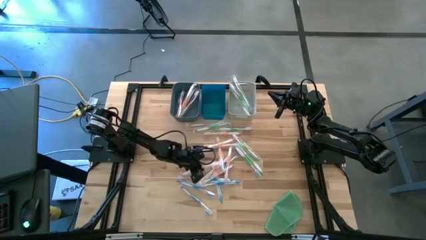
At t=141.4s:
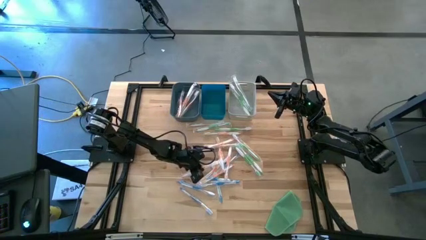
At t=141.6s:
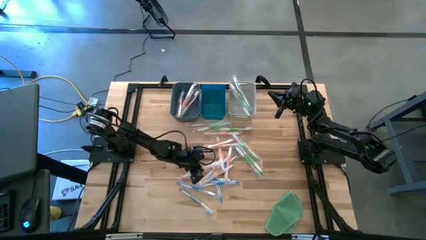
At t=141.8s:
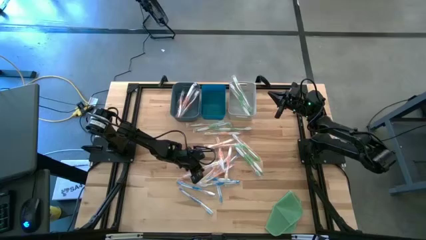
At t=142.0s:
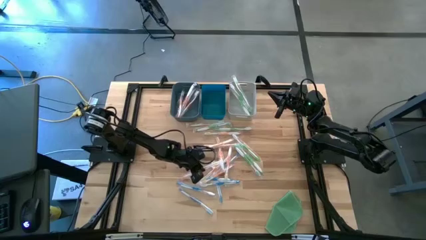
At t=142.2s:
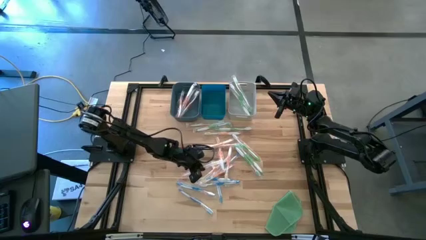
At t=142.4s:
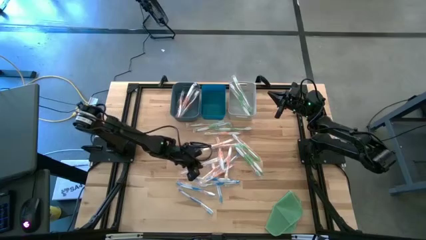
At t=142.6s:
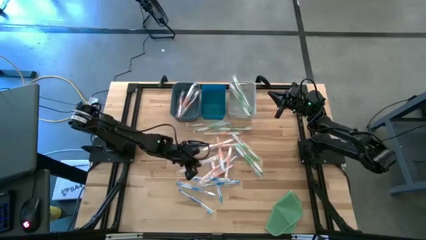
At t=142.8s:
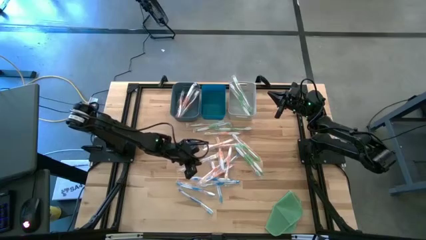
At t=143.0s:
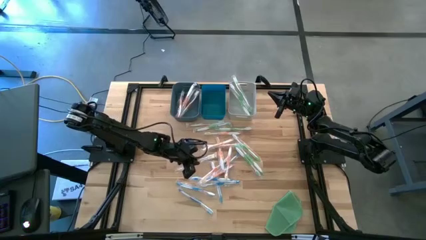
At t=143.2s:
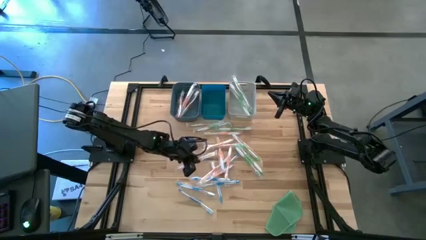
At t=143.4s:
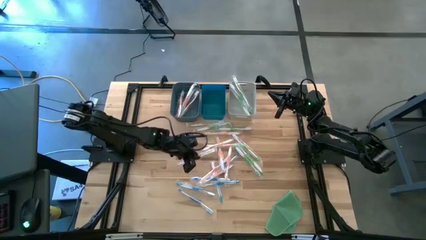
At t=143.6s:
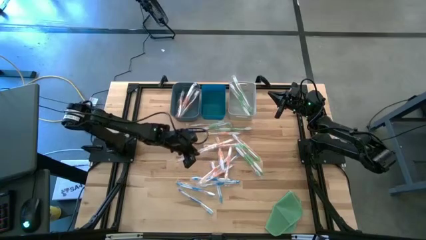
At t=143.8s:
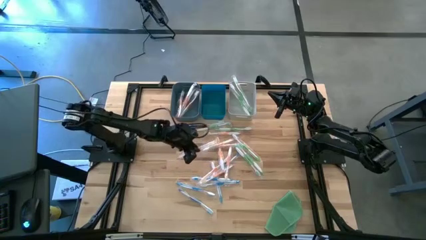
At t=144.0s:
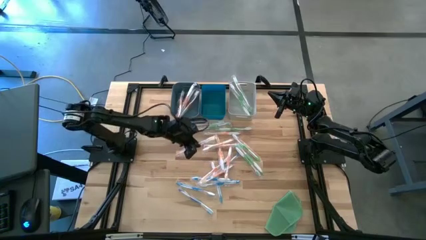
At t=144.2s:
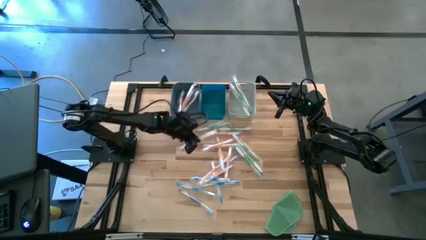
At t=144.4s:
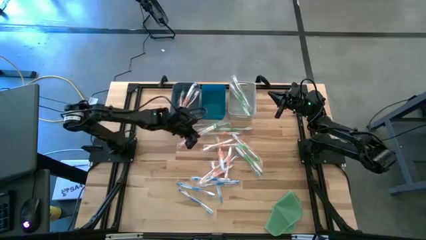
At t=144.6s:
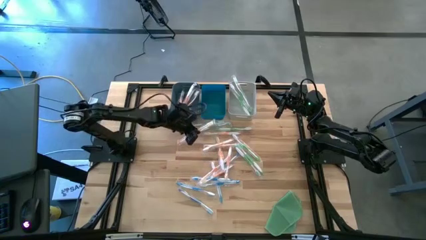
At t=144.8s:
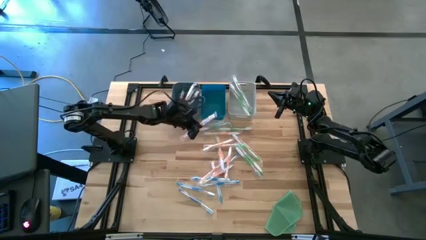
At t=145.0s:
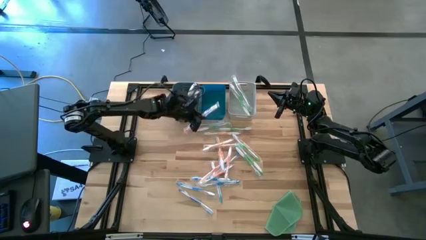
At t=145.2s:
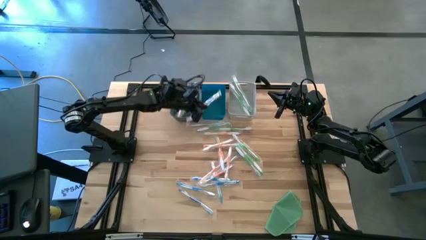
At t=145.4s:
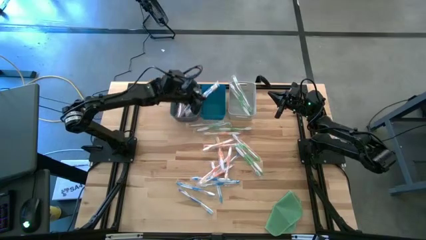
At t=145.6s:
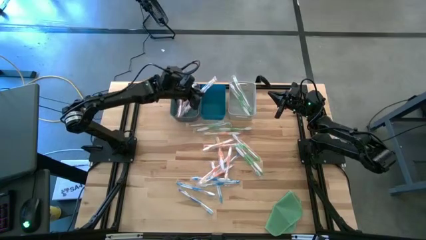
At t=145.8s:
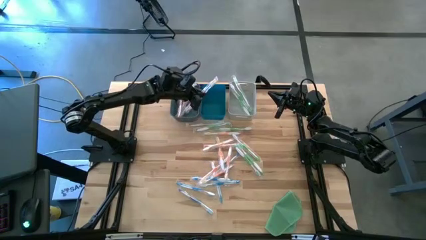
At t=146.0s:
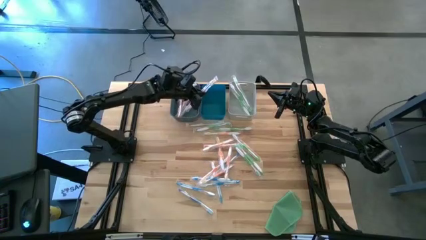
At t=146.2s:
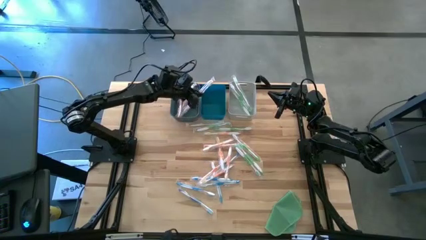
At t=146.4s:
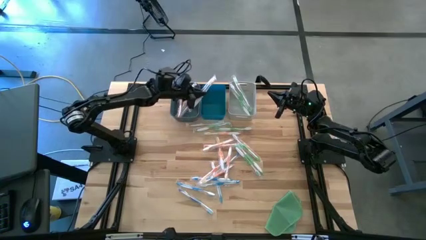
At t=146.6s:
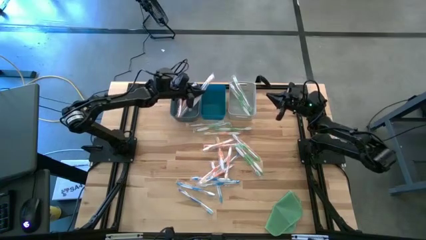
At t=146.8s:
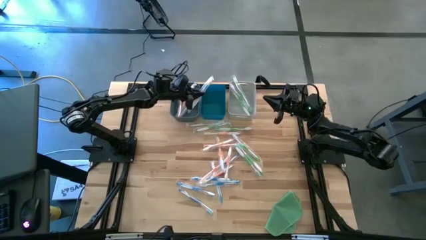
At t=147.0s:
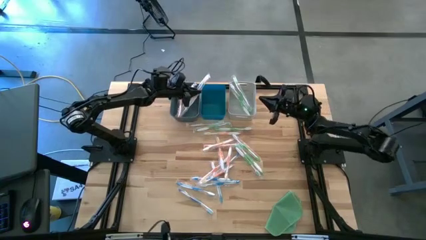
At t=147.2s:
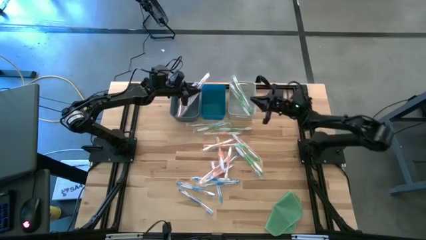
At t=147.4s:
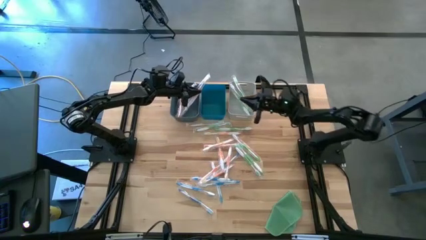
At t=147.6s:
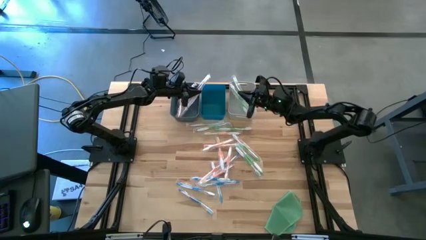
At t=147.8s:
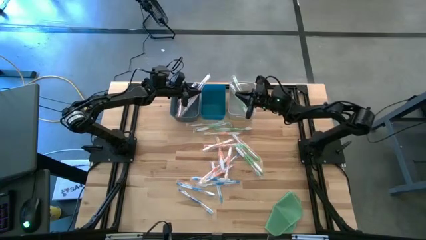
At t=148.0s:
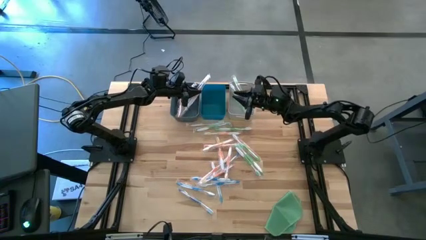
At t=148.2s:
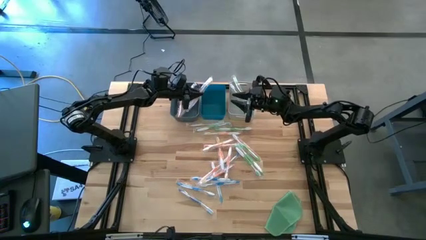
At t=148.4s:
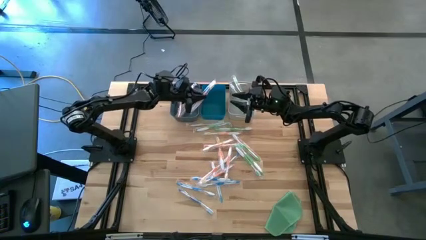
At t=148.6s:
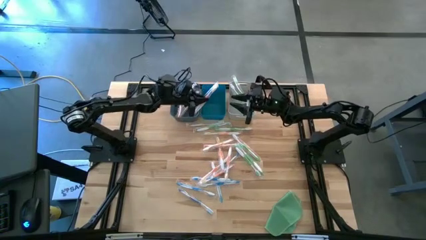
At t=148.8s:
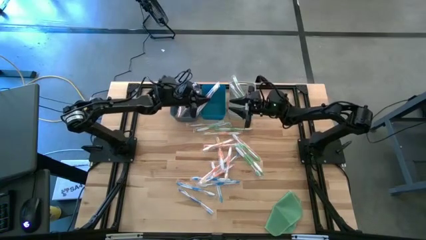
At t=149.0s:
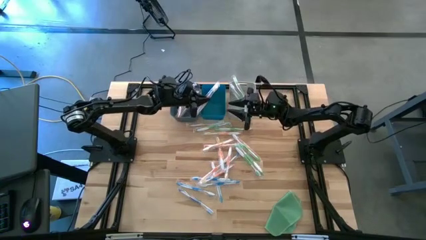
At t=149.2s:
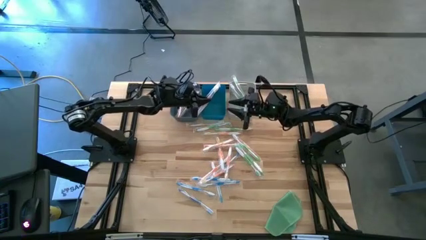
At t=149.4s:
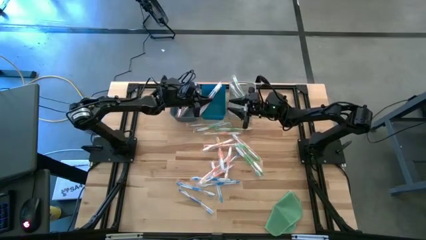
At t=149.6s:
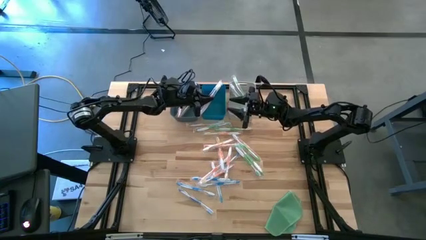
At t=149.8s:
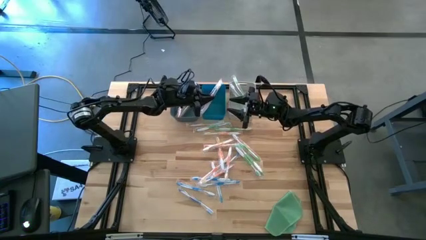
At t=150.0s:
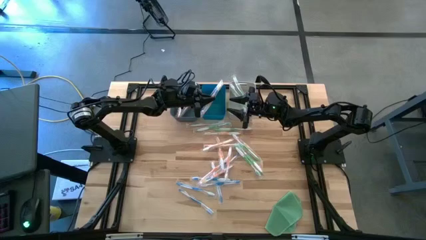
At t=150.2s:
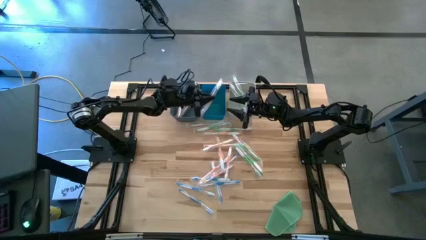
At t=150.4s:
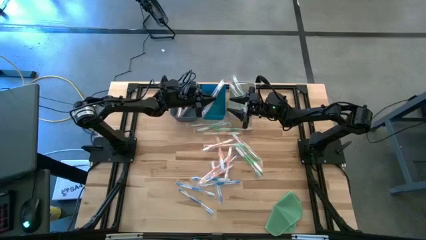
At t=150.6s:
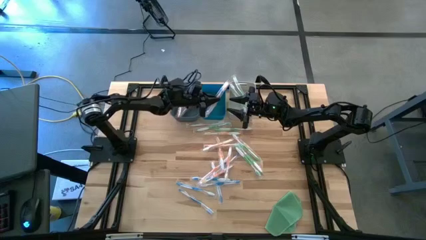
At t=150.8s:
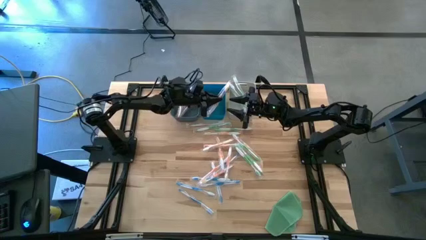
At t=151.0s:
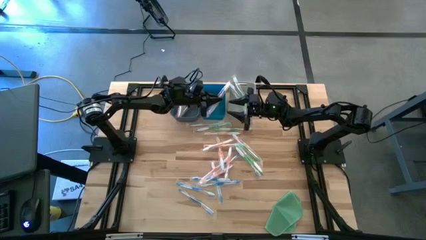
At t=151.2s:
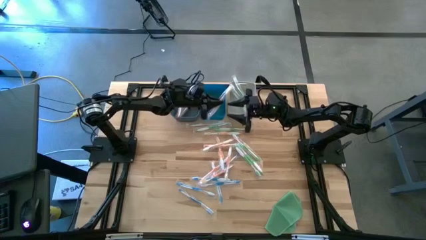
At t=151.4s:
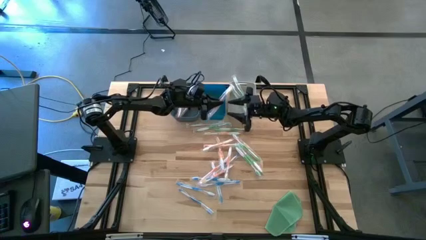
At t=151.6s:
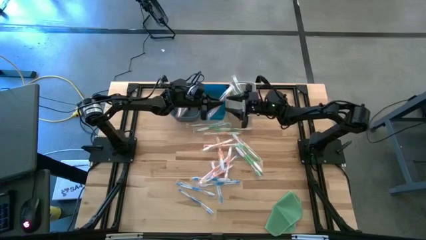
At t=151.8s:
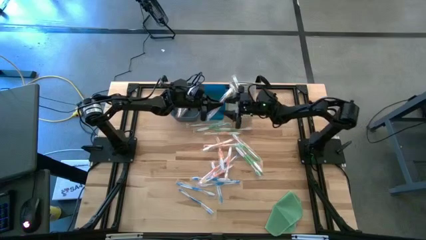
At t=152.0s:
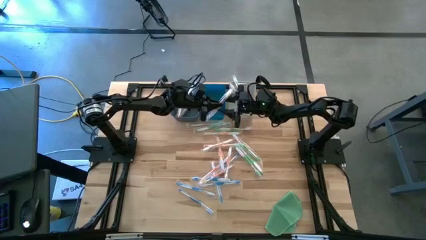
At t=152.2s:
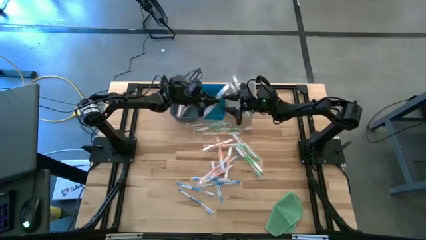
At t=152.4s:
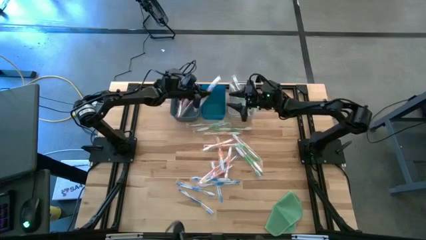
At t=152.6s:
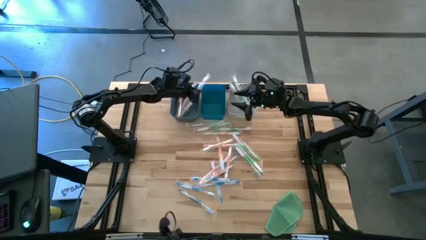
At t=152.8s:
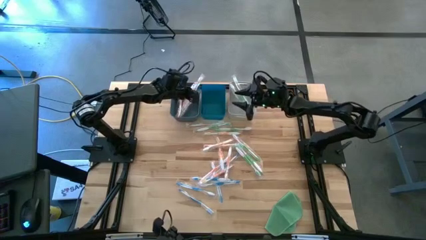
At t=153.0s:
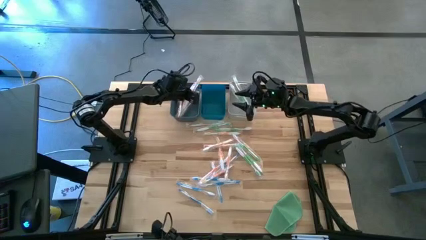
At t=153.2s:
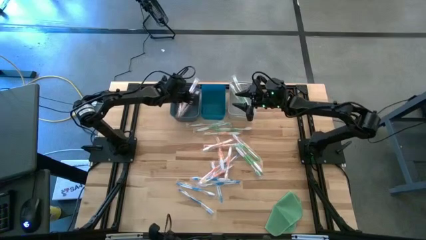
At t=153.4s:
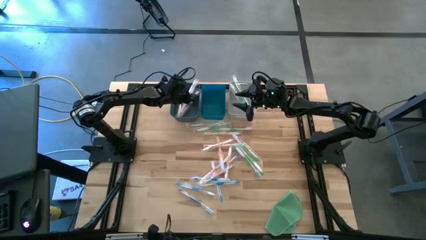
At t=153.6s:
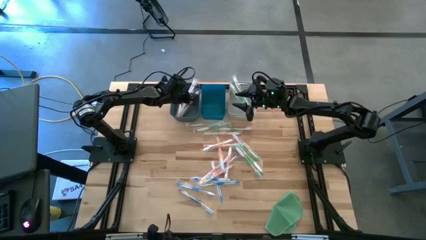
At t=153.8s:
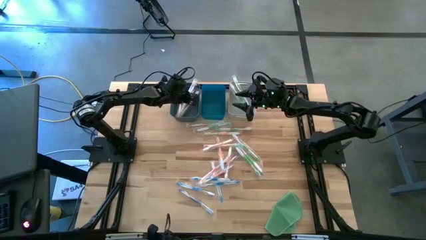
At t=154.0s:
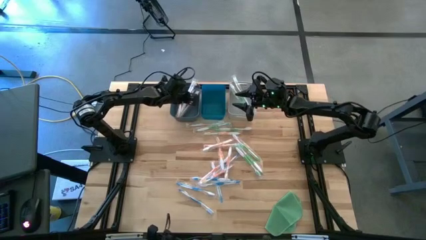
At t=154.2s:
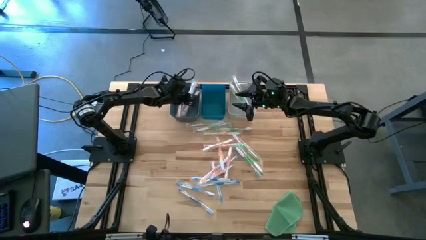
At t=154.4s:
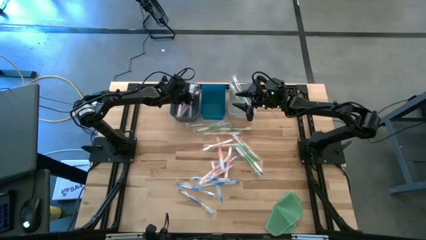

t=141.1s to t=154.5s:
Task: Pick & Place Toothbrushes
Put the orange toothbrush into the dark blue bin

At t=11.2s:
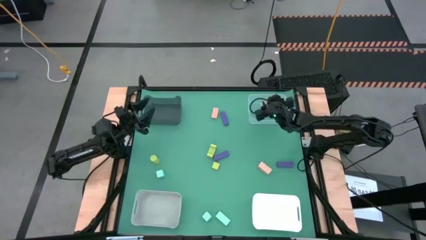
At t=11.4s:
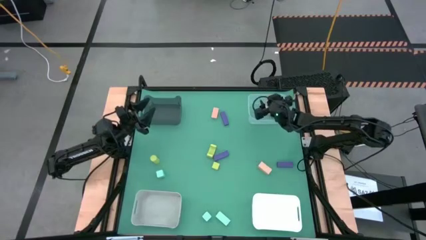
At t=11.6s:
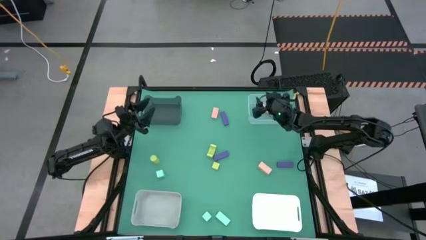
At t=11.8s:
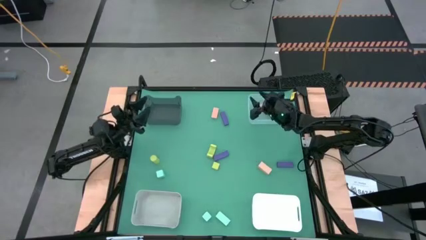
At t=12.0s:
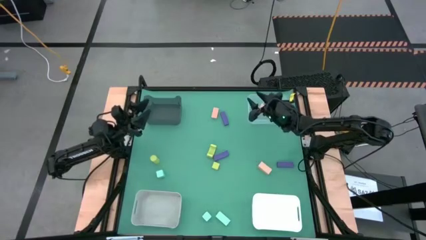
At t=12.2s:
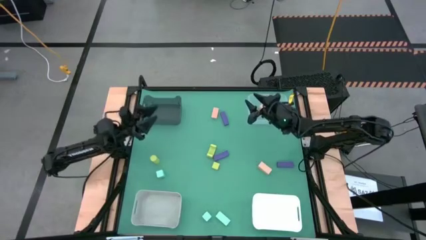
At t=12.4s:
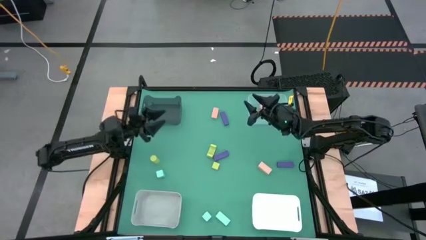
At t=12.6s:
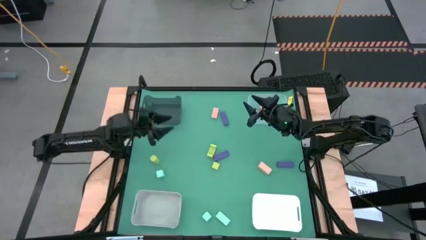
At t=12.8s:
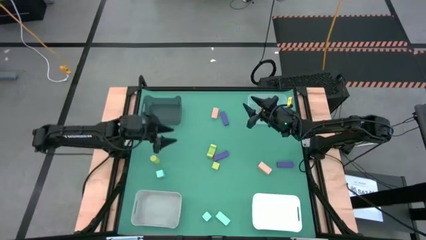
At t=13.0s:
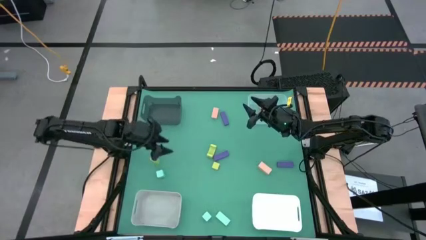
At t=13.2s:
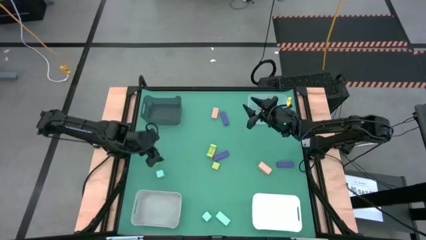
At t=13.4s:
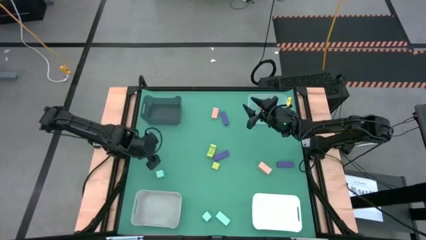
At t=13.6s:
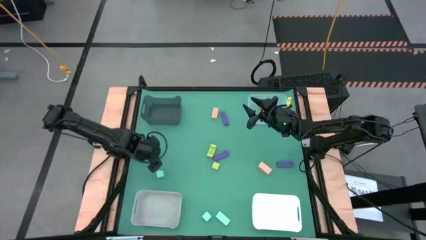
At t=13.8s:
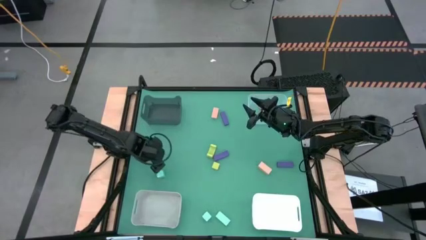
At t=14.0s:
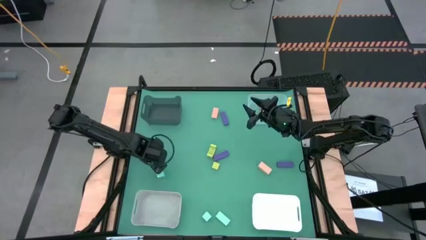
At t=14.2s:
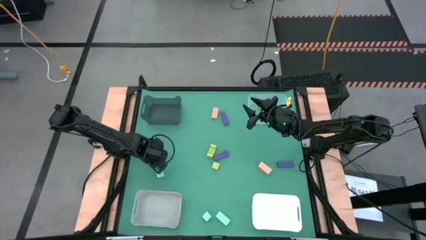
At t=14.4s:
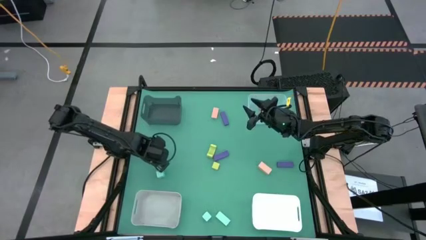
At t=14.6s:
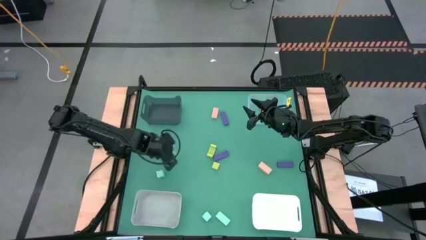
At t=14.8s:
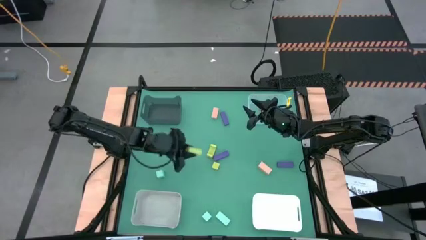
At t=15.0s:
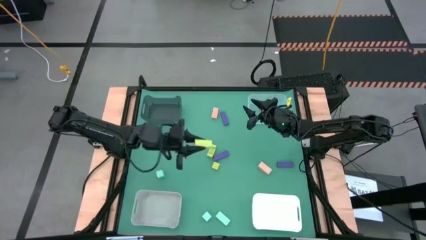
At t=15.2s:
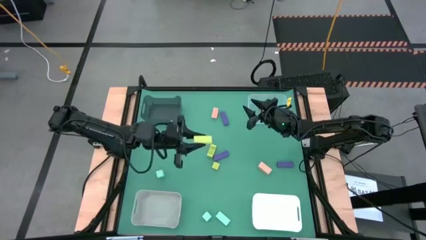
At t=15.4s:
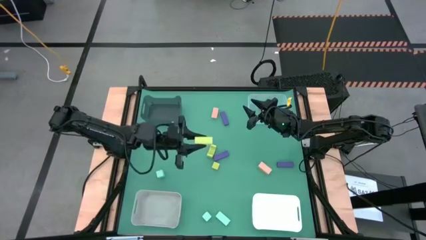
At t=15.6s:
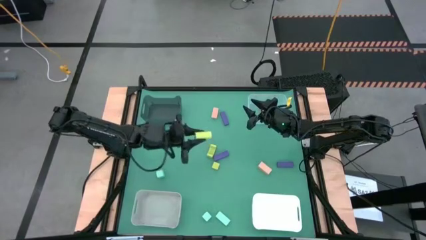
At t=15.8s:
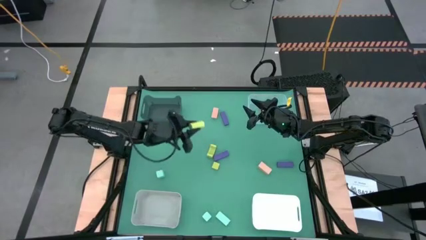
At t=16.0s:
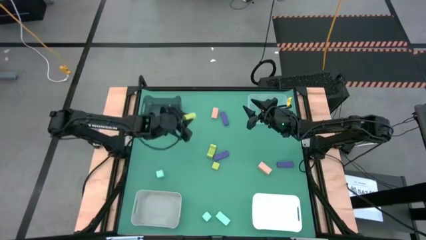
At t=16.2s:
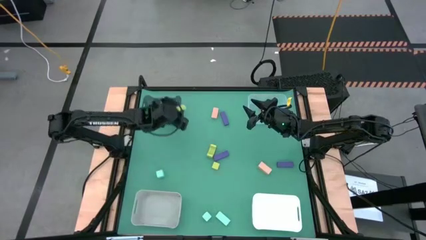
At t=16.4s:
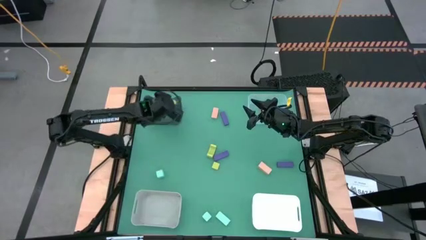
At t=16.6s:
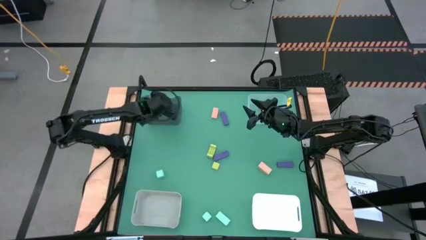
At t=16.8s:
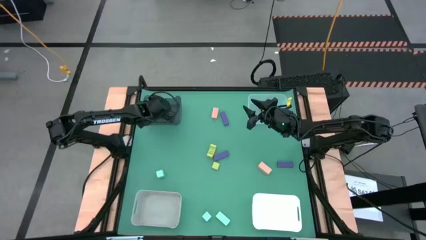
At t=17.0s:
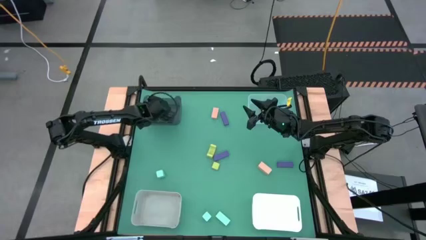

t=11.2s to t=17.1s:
Task: Sort & place blocks by color
Put the left light green block into the black bin
